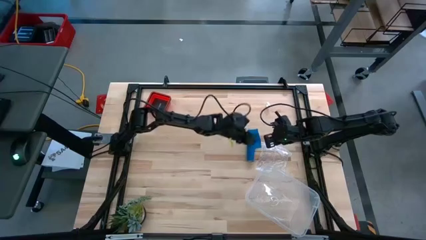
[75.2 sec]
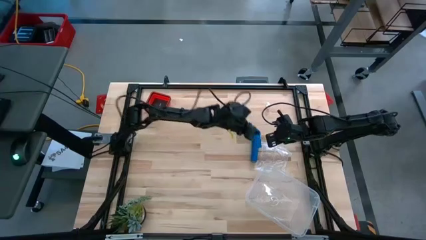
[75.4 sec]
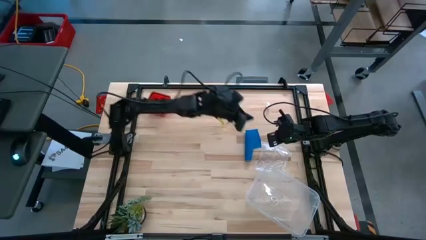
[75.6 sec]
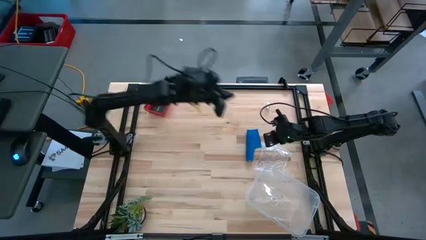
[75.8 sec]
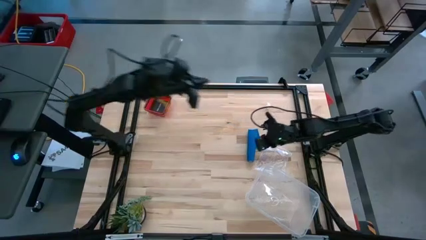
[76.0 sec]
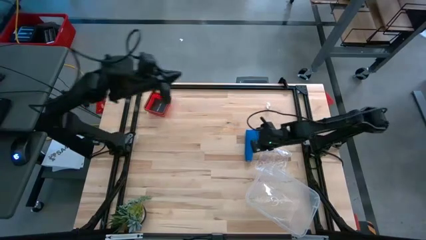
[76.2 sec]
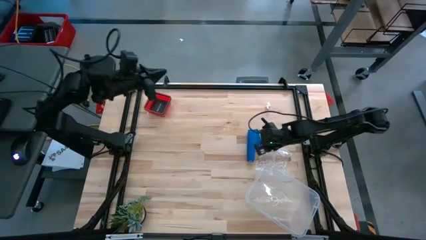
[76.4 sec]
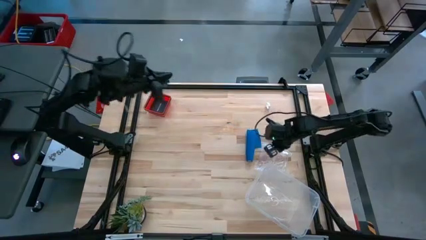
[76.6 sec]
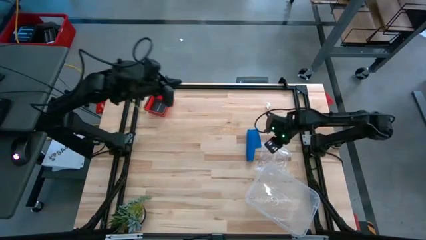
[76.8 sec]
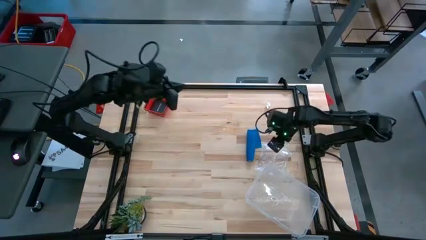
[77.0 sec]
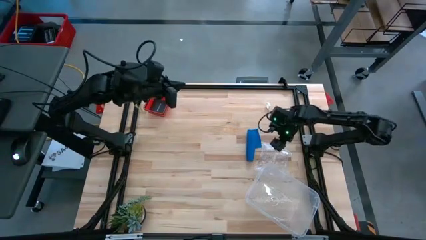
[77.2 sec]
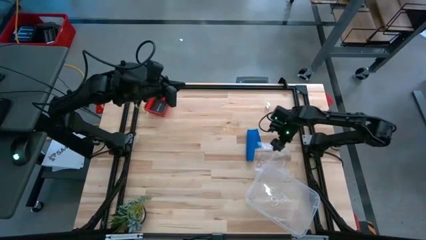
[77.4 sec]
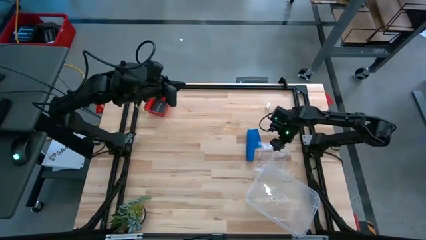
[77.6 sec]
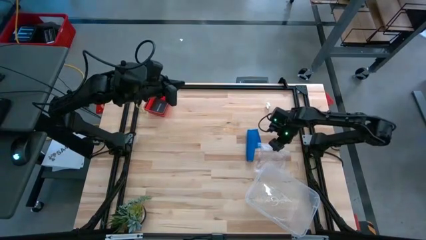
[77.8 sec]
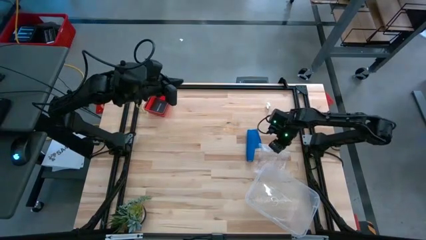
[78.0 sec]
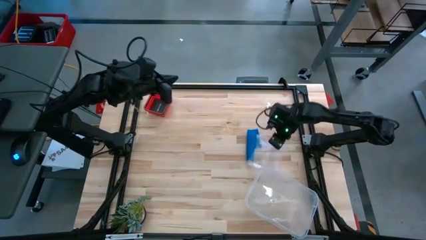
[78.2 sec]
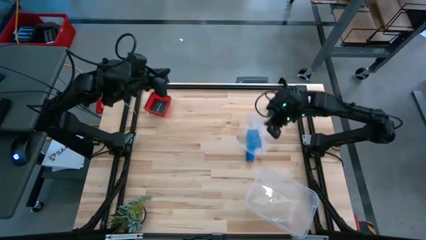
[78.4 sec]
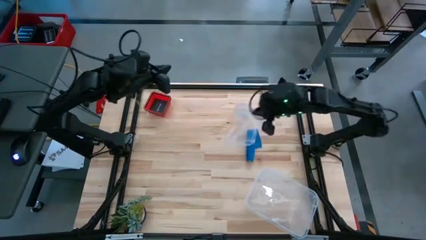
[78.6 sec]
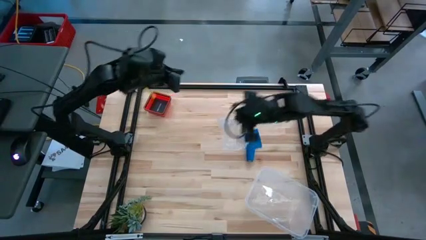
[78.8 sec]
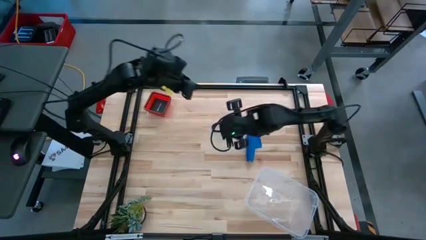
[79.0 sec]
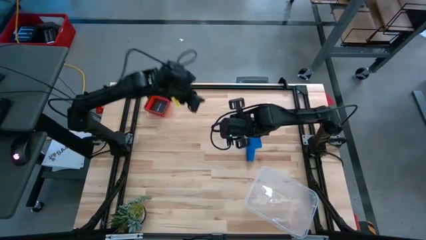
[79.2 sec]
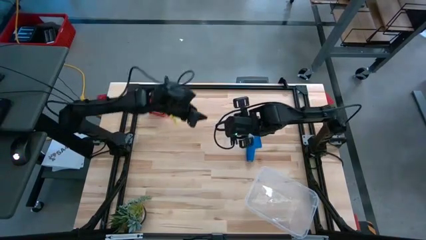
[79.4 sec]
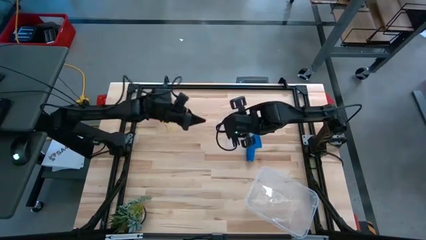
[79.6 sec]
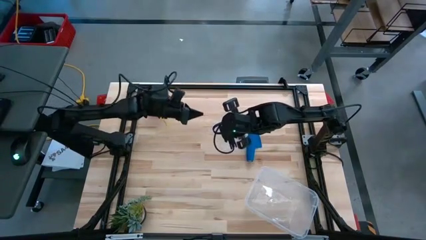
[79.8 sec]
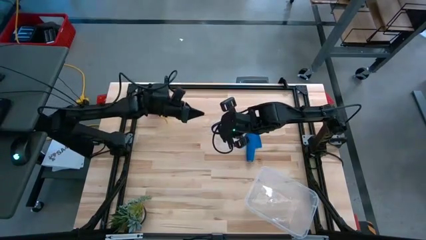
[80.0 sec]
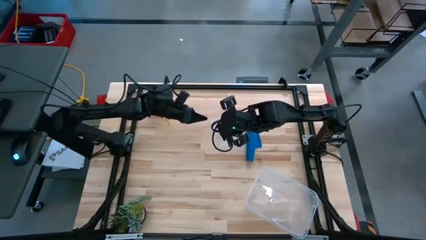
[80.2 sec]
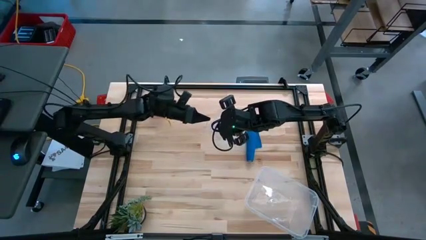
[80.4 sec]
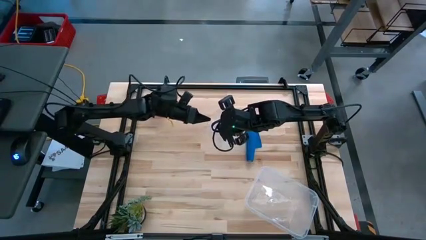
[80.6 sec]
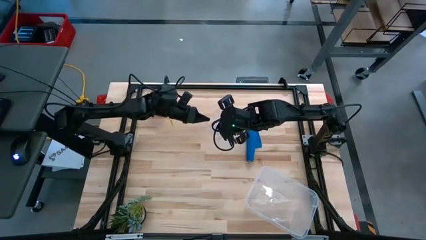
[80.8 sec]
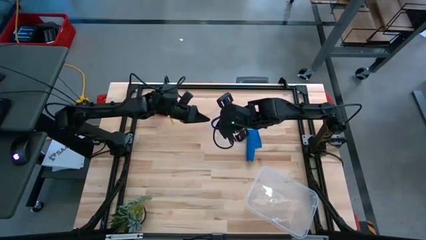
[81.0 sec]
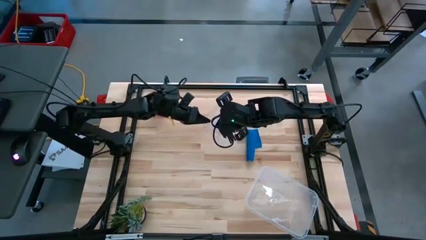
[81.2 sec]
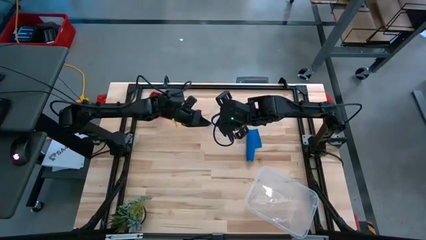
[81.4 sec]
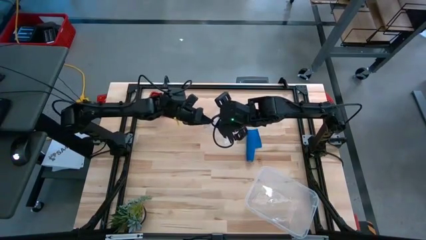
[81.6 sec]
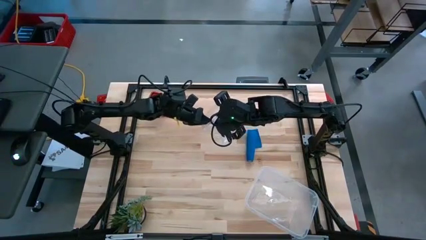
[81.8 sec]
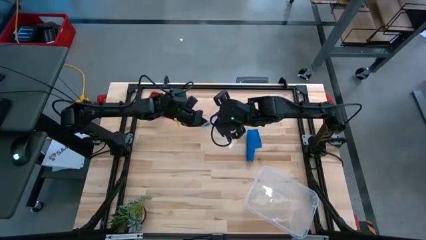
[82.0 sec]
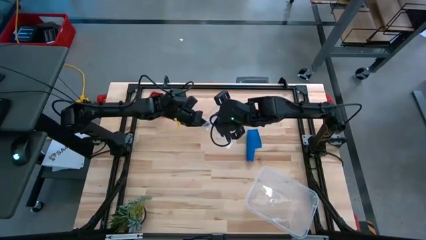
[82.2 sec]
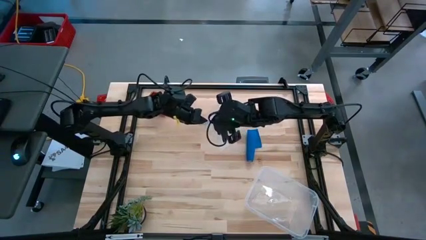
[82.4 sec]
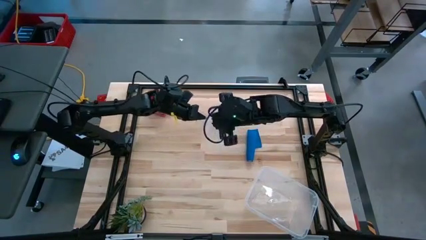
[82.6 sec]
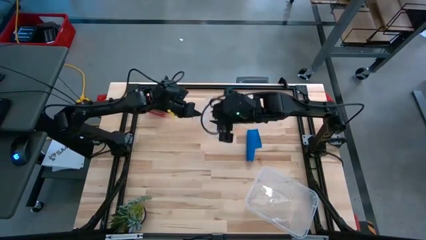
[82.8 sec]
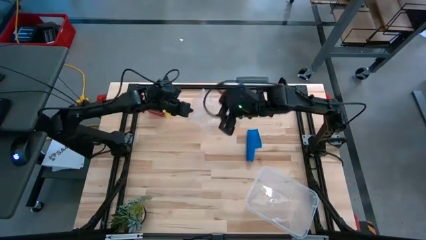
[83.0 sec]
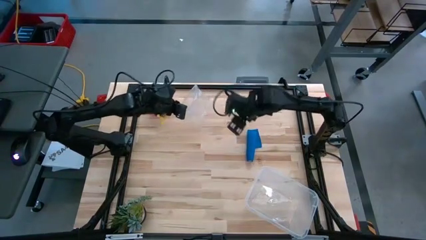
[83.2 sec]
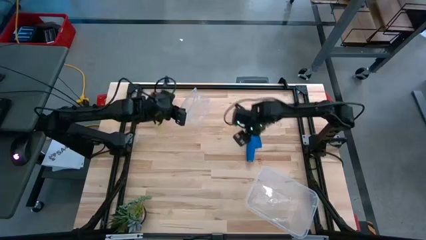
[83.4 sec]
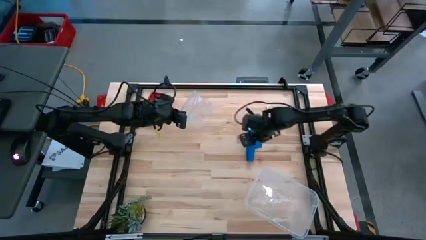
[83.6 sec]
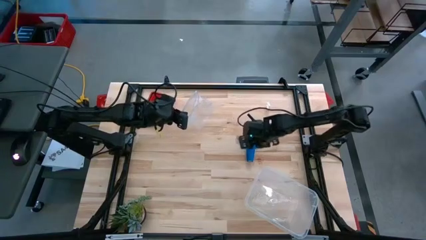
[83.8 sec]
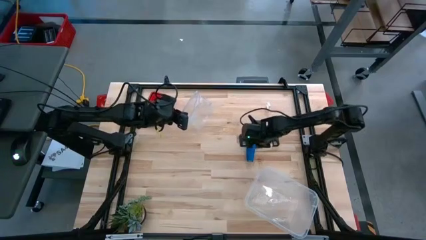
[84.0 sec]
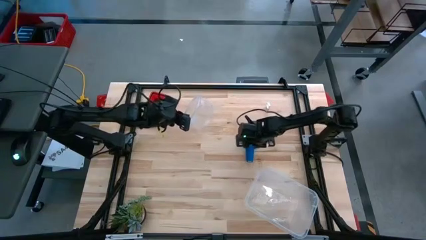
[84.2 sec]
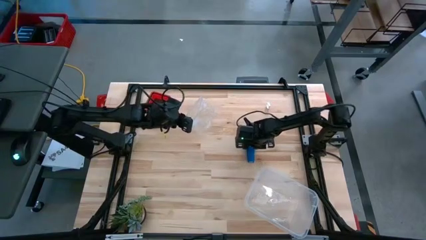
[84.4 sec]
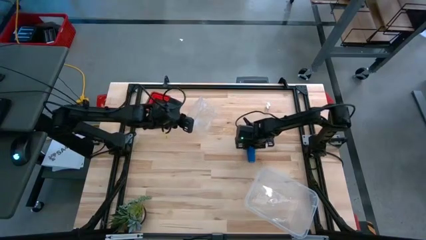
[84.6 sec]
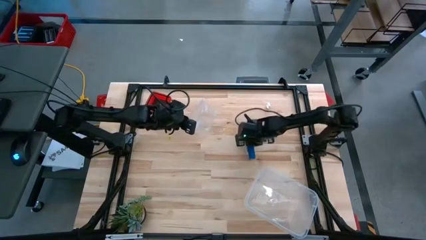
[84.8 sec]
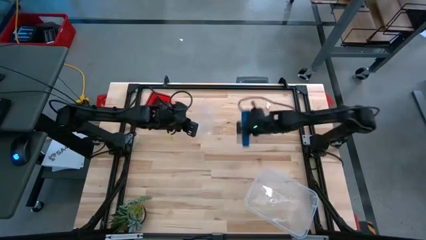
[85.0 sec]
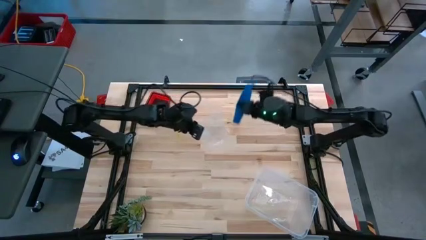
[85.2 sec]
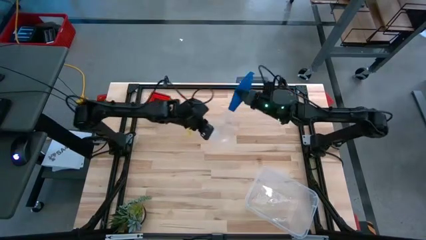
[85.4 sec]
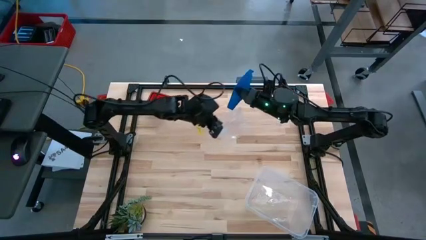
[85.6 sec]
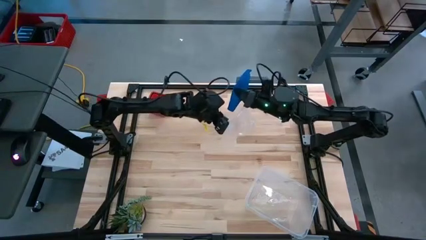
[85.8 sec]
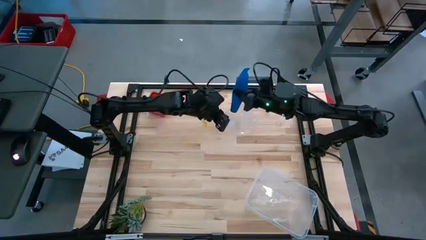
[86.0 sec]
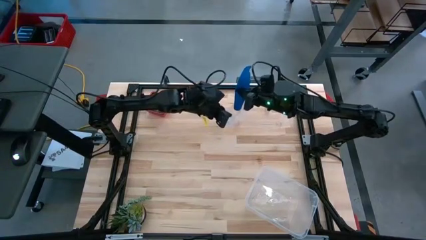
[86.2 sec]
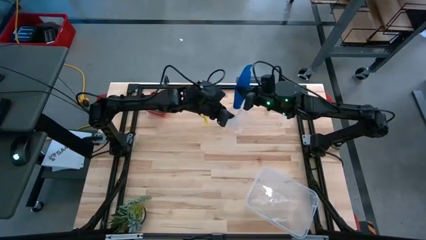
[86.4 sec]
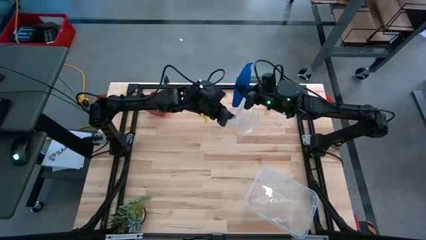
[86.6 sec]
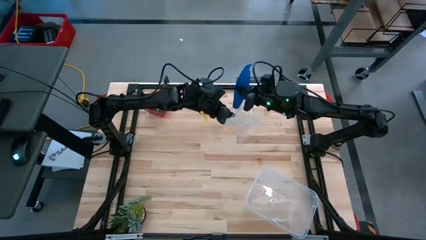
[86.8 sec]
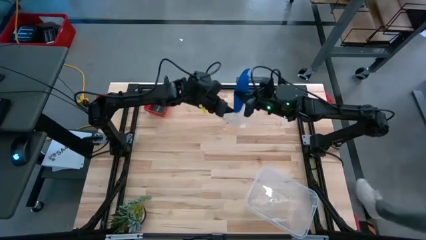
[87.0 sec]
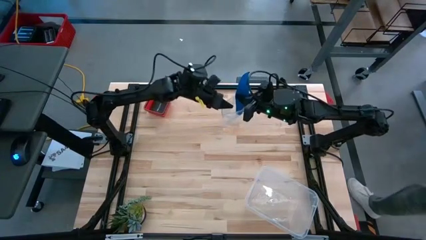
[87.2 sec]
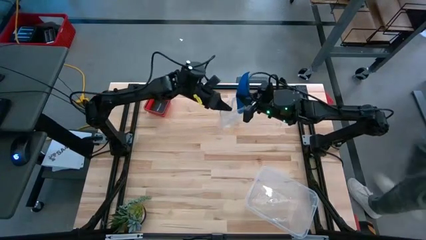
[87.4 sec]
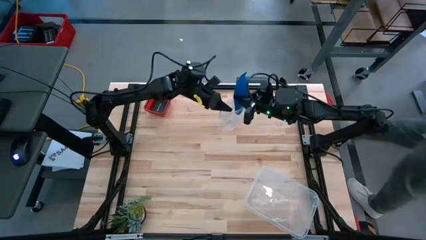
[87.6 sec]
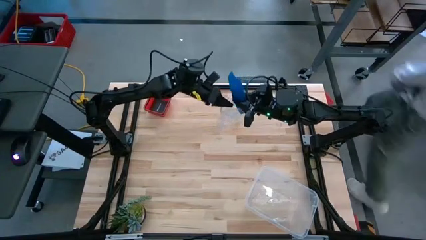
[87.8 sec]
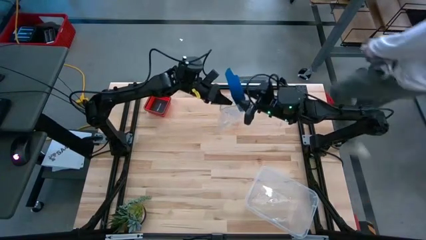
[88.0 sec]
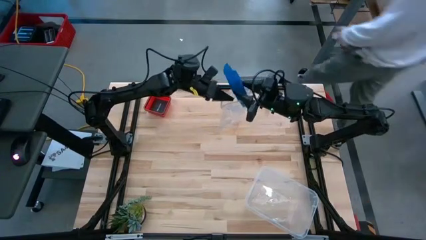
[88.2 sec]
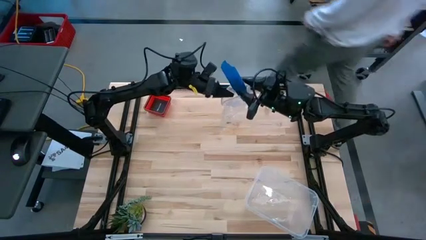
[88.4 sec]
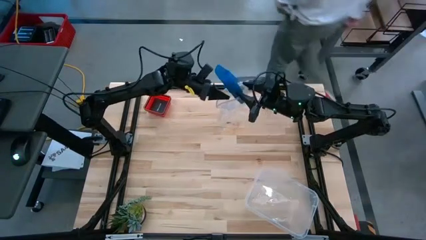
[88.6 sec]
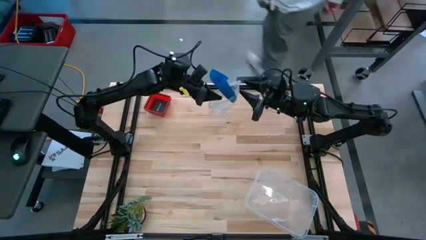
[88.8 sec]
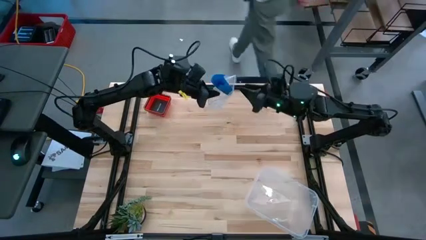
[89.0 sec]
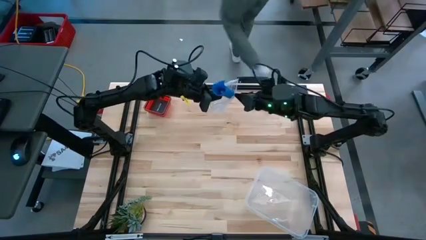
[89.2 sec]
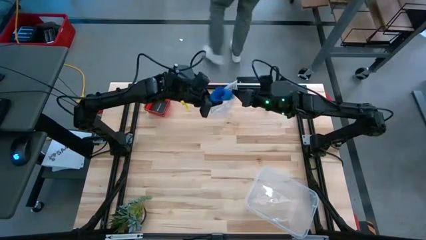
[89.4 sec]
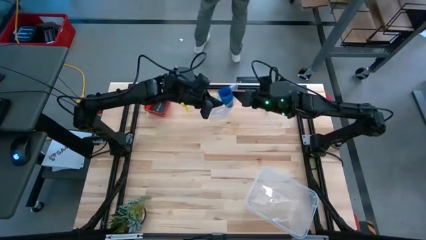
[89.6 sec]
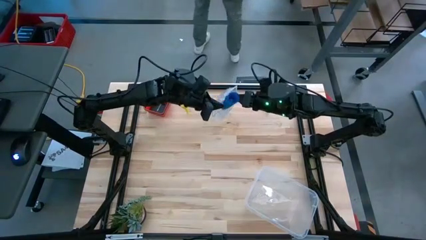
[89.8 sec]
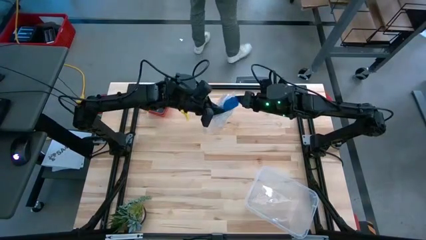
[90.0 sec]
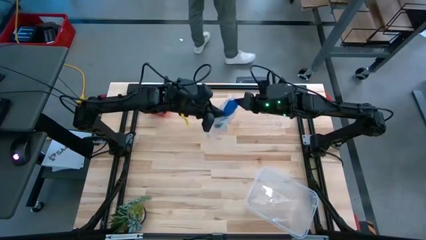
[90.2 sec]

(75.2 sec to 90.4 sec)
Task: Roll bandage
Put the blue rolled bandage into the transparent zip bag

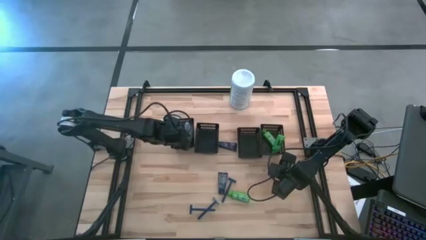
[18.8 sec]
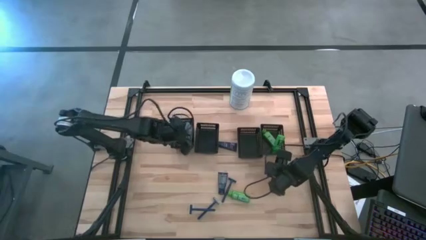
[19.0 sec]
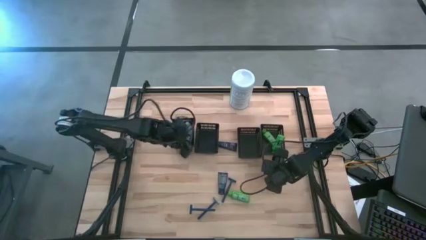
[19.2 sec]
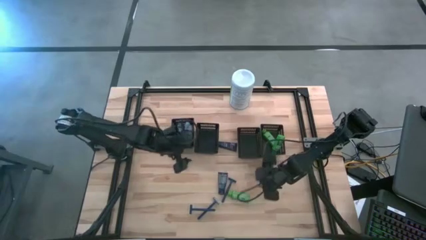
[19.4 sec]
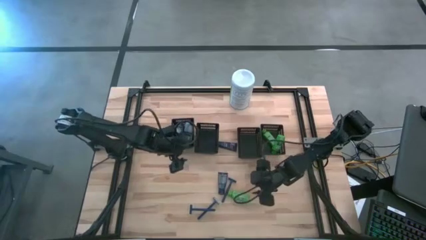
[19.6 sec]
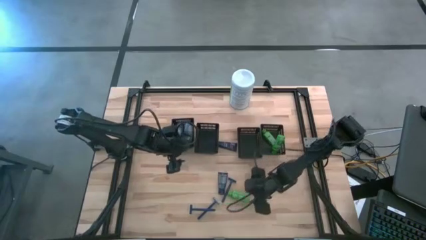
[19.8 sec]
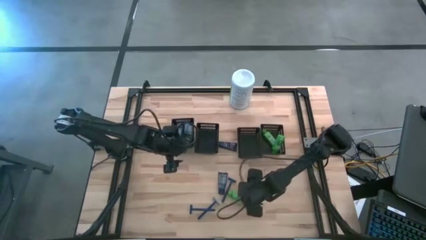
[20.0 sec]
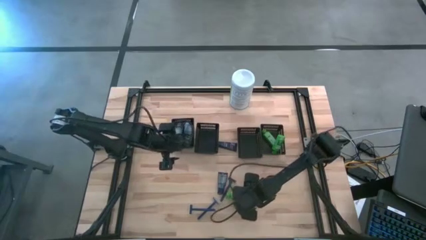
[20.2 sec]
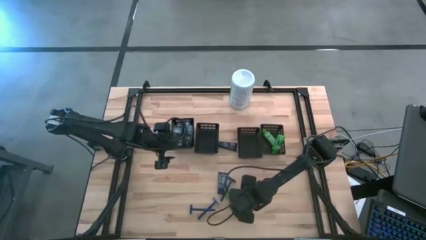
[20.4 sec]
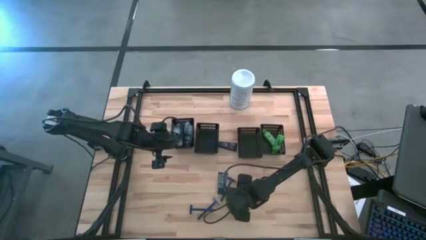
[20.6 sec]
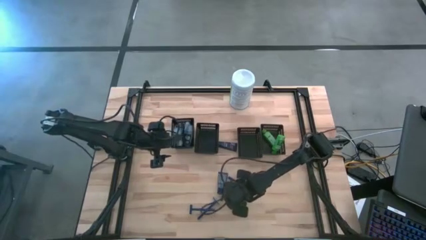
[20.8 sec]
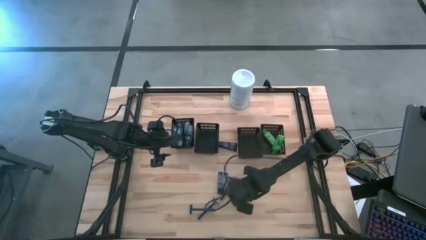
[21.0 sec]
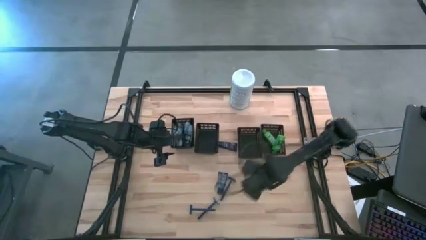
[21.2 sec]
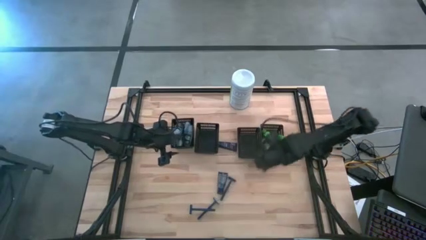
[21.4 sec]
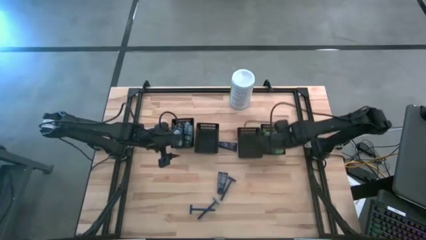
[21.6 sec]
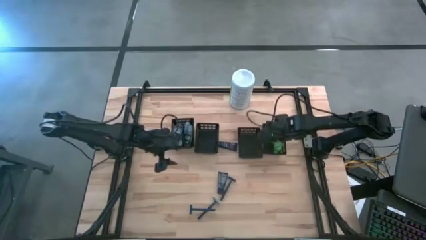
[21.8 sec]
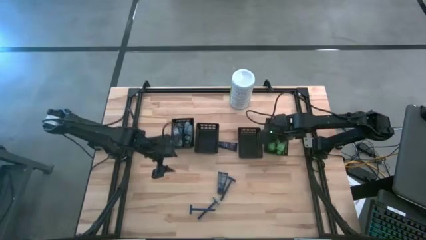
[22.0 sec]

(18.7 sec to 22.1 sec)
Task: Pick & Place Travel size toiletries
Put the green shampoo into the right black bin
